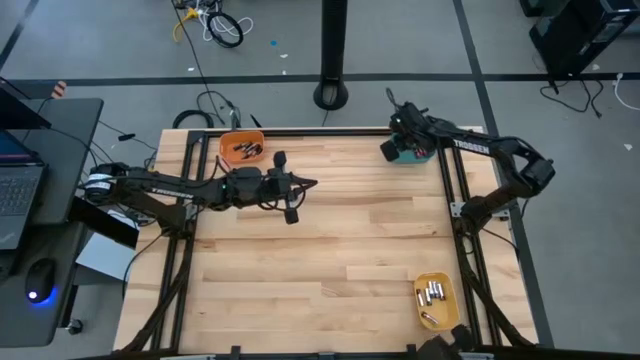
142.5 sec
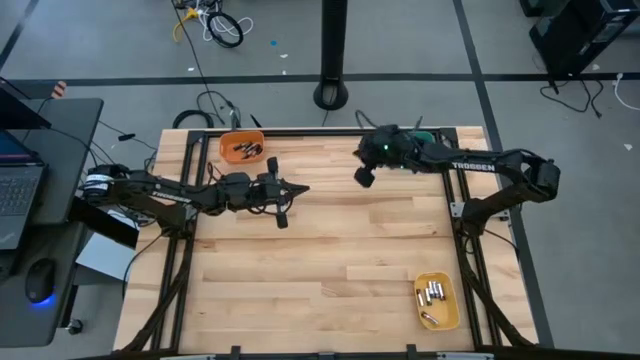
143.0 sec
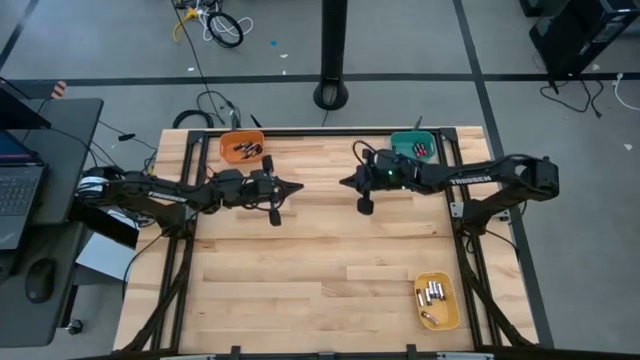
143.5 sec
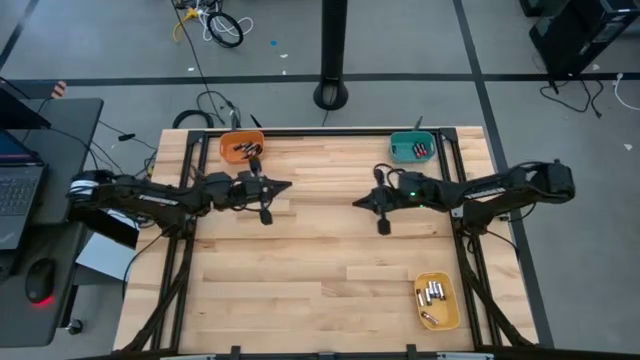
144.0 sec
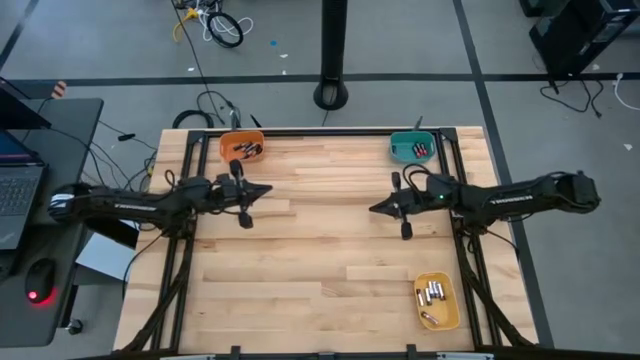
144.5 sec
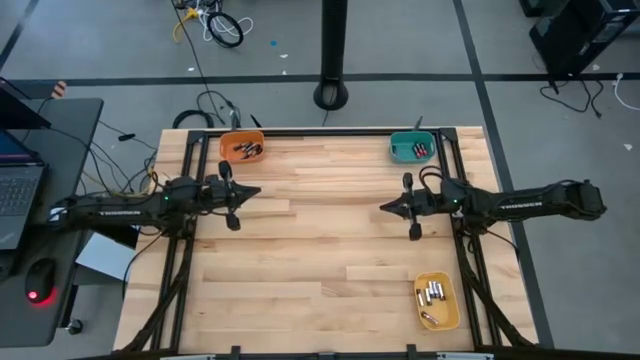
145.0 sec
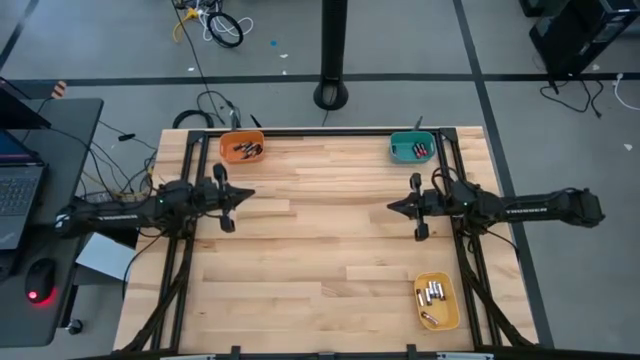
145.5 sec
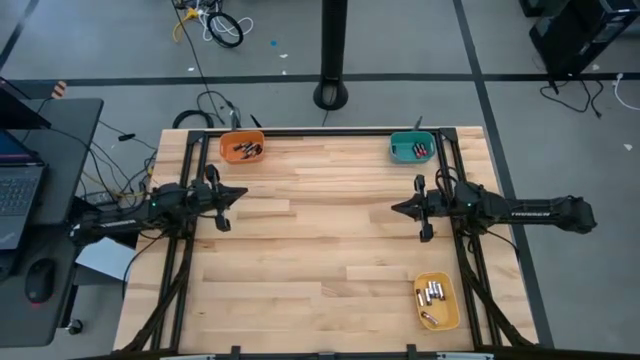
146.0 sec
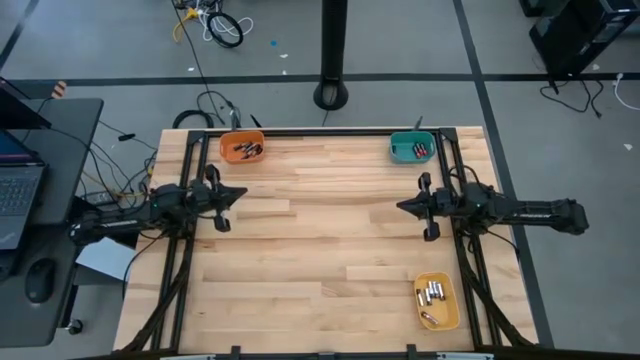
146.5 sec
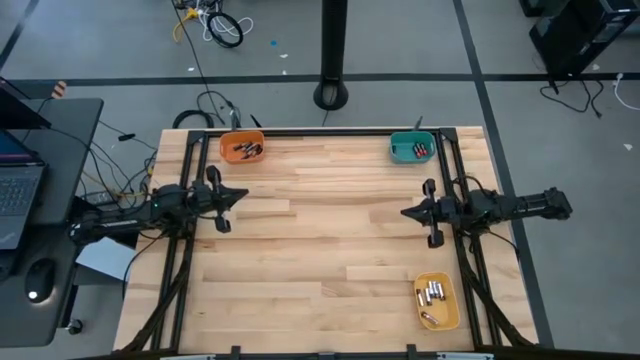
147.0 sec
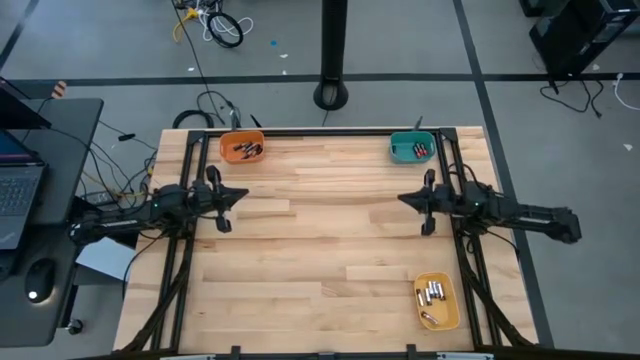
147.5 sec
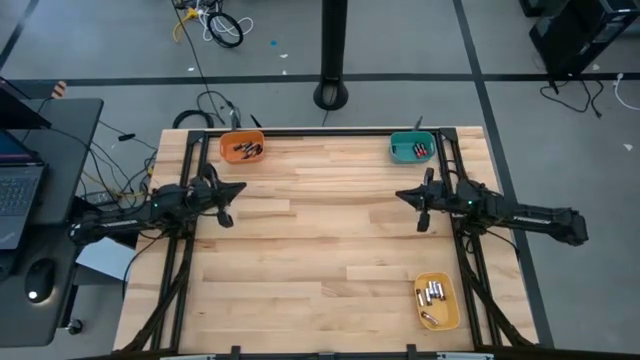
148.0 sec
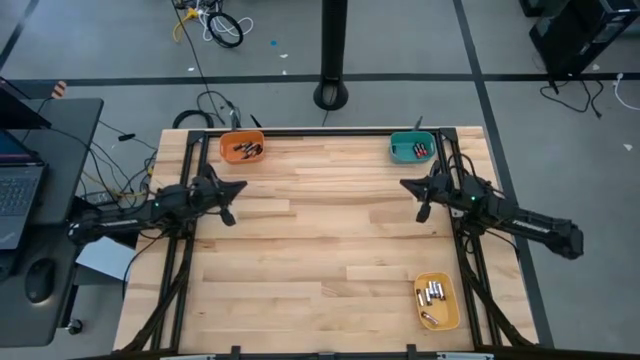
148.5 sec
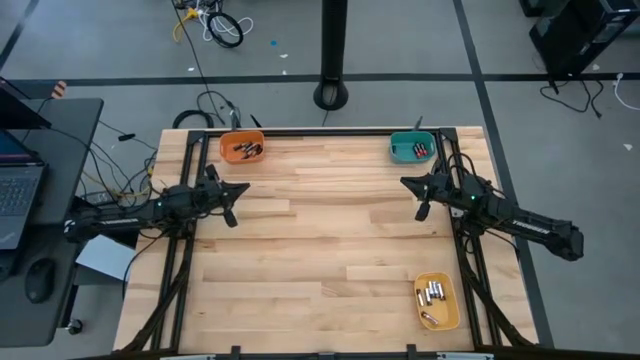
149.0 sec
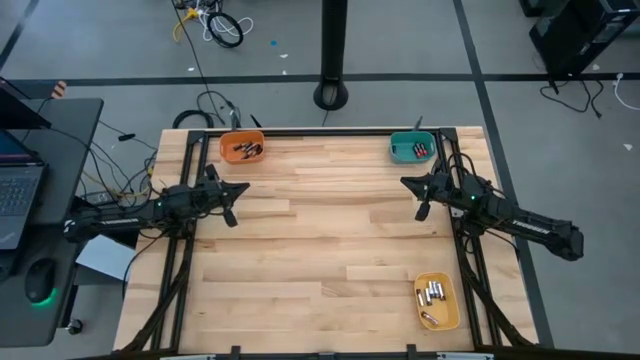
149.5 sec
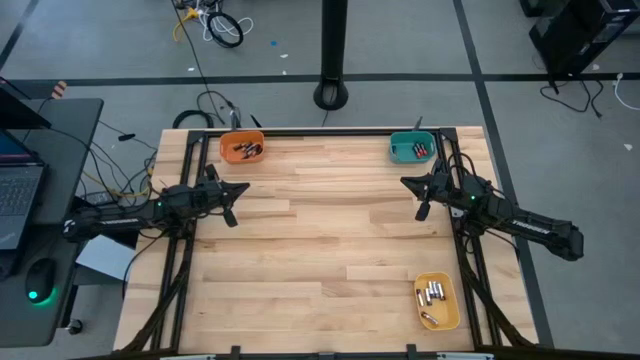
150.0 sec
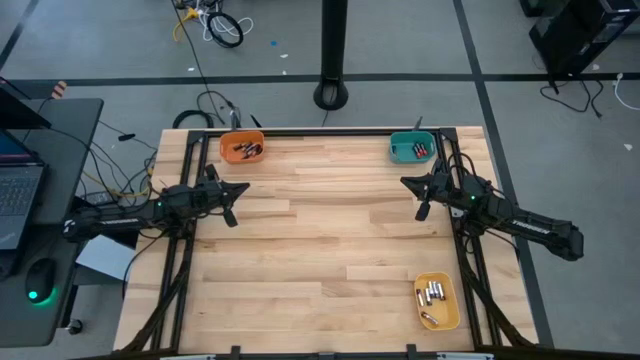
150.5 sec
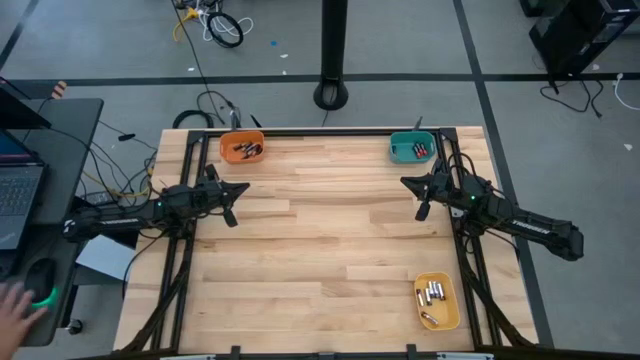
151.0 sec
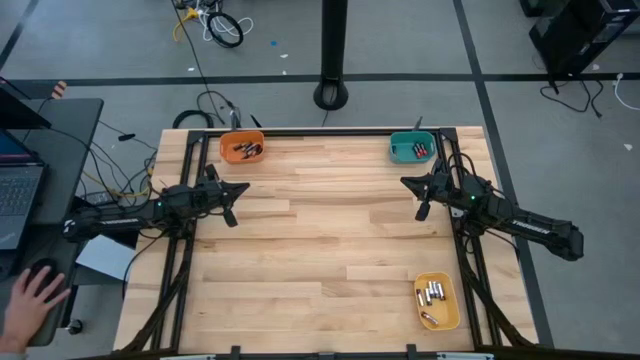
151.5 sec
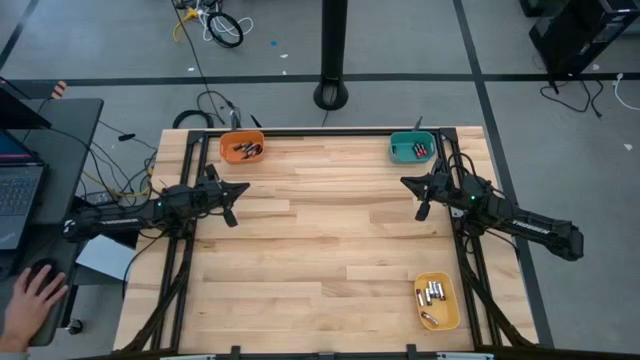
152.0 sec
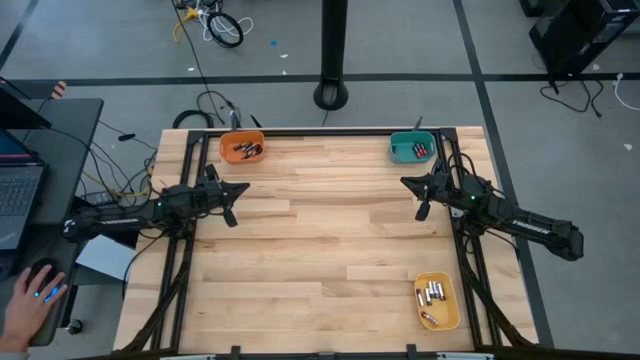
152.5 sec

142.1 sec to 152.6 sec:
Task: Sort batteries
Return to Home Position

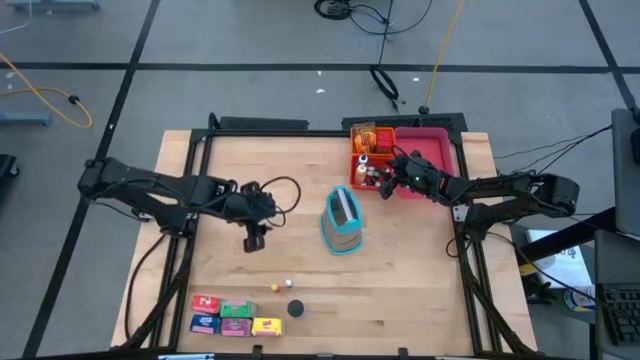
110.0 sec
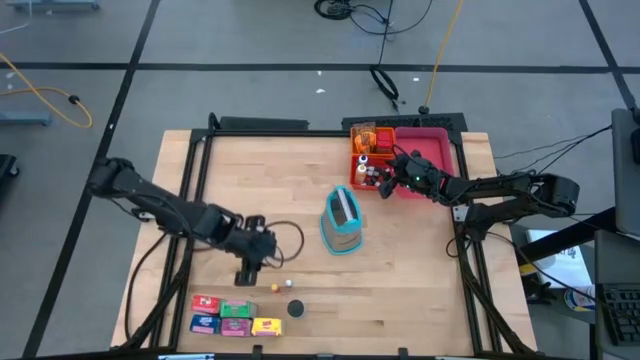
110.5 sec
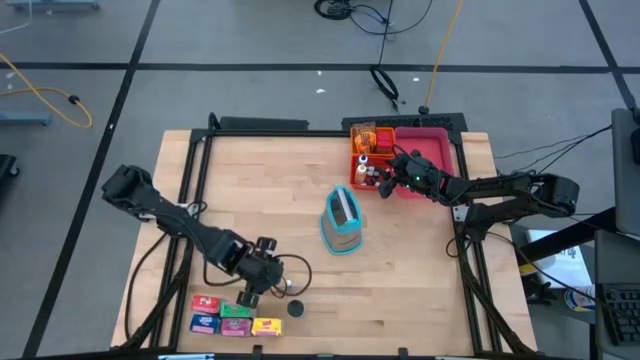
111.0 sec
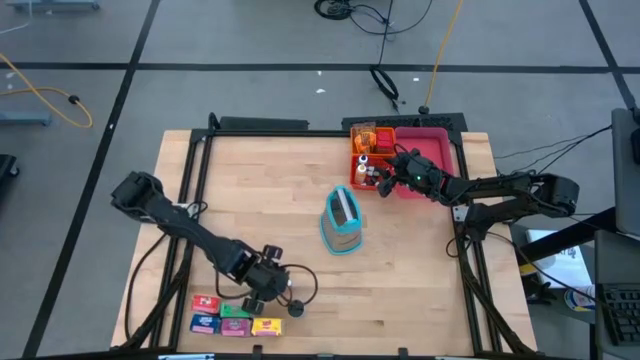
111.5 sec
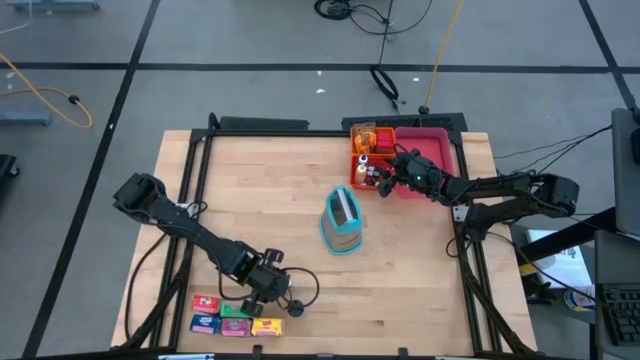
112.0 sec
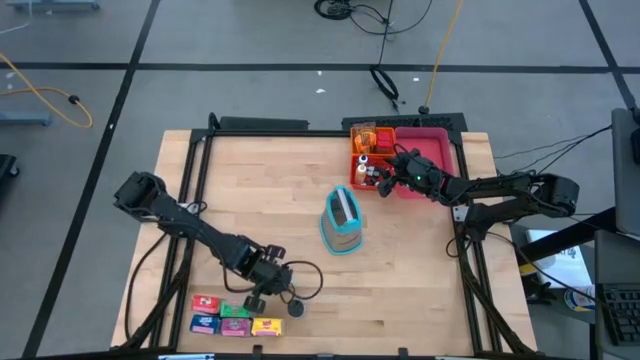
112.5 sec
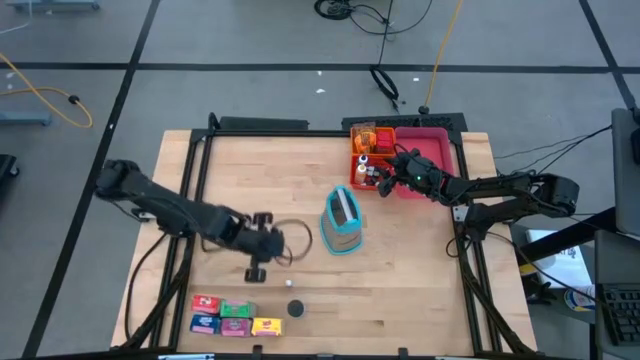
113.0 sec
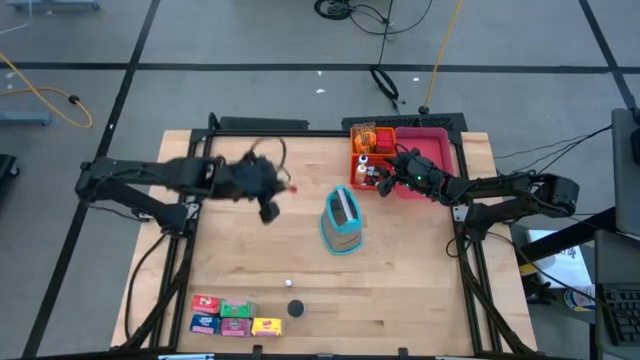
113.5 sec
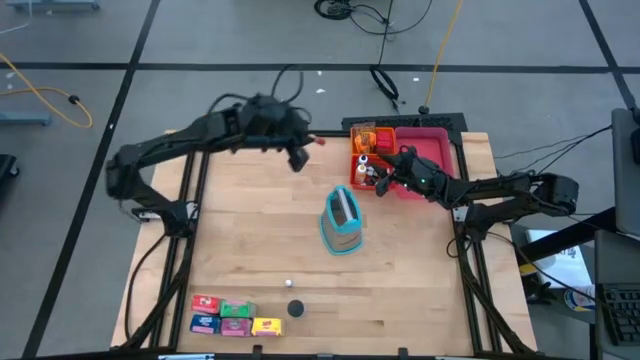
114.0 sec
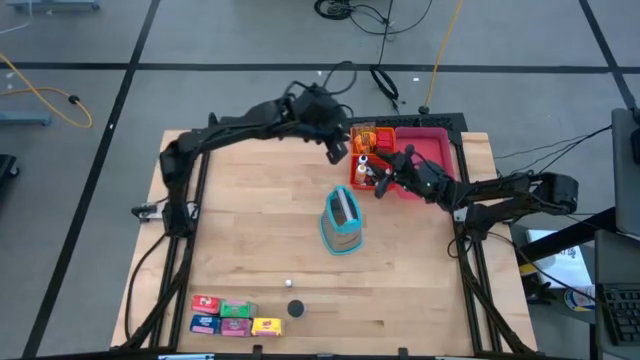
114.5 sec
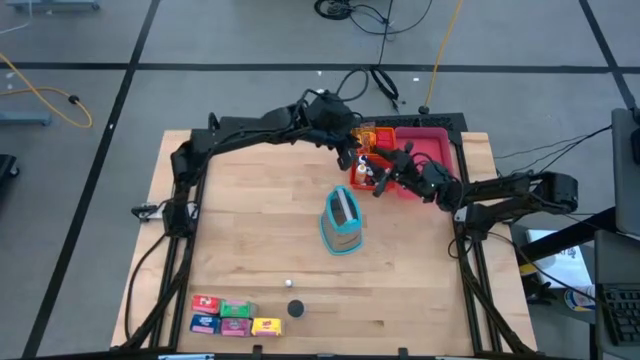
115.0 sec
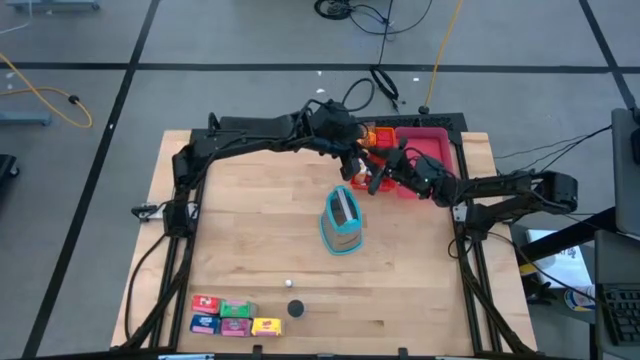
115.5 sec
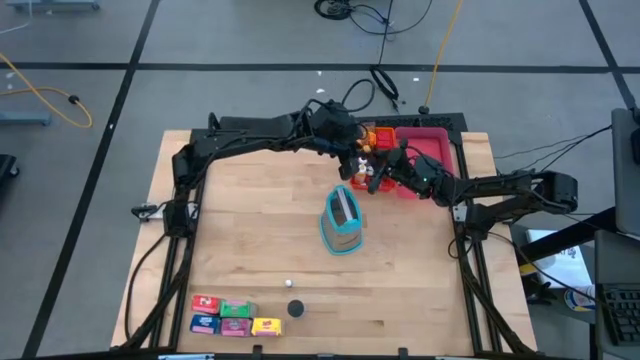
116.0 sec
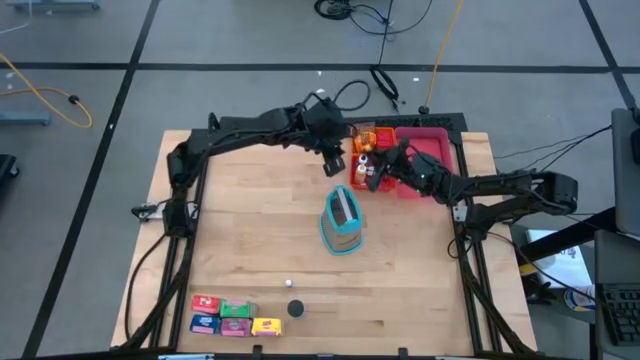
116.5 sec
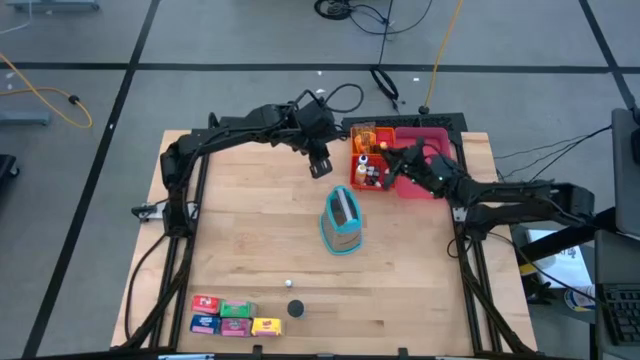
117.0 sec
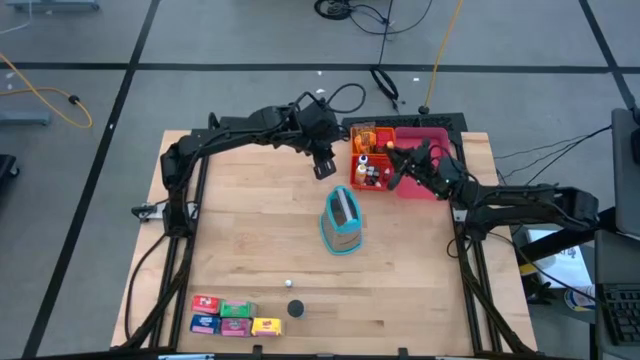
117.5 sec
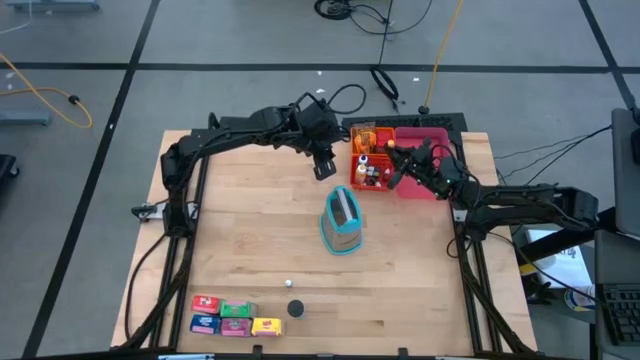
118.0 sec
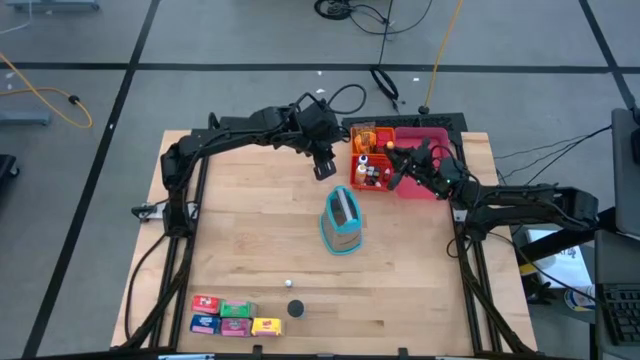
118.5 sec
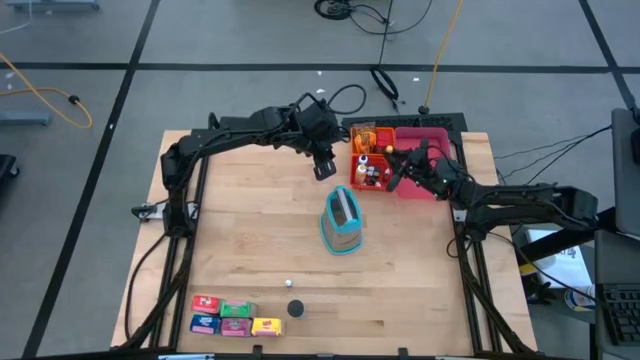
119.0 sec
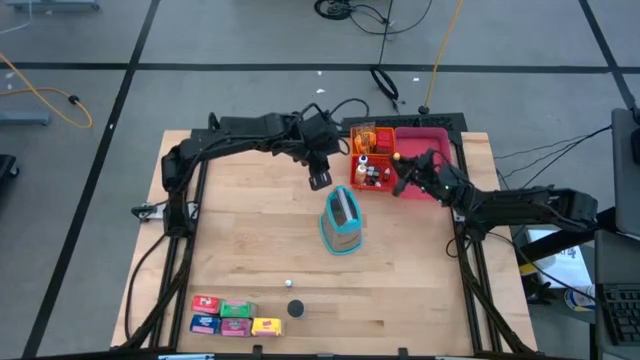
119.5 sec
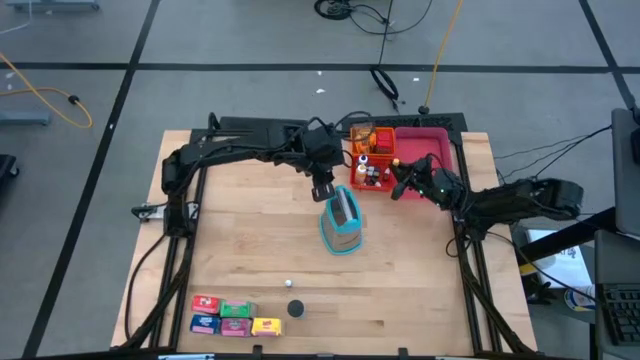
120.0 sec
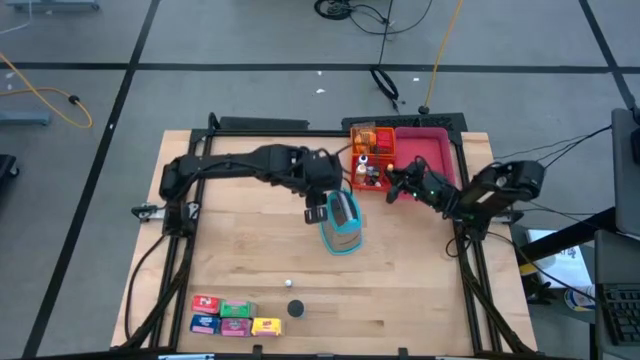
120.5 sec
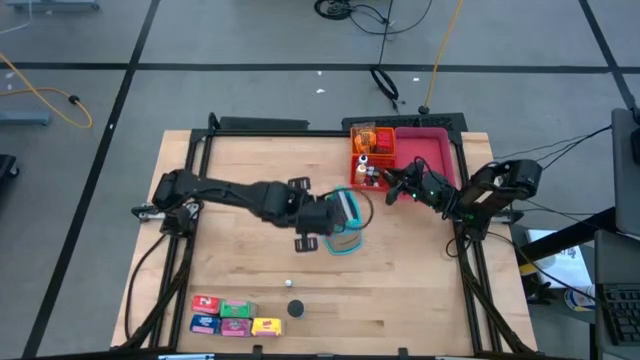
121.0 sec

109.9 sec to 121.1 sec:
Task: Pick & Place Kitchen Items
Put the small yellow orange food coloring bottle into the red bin
